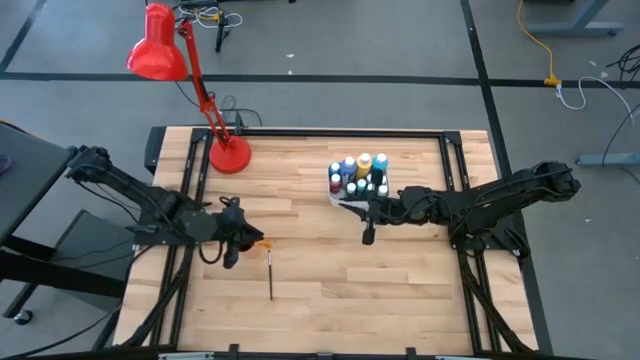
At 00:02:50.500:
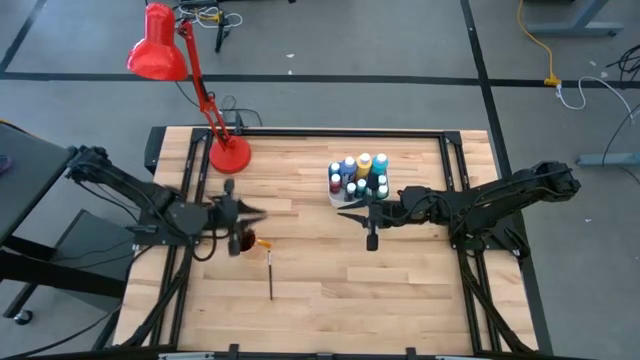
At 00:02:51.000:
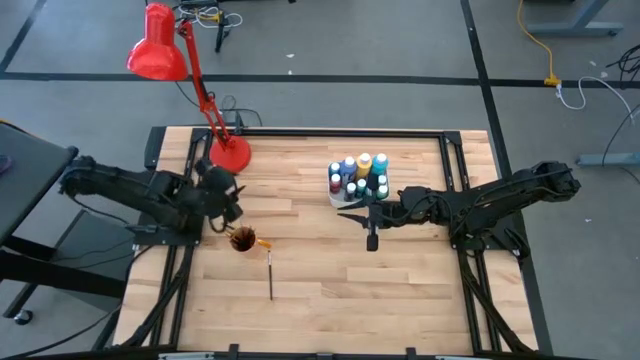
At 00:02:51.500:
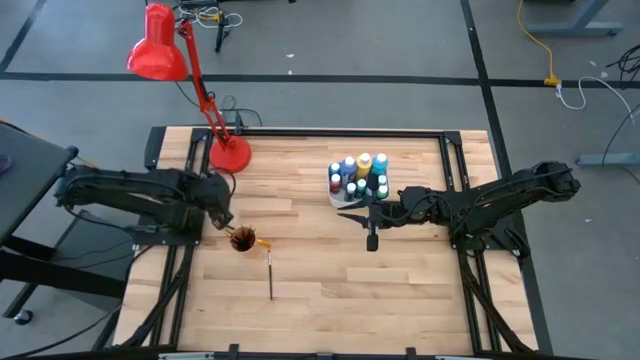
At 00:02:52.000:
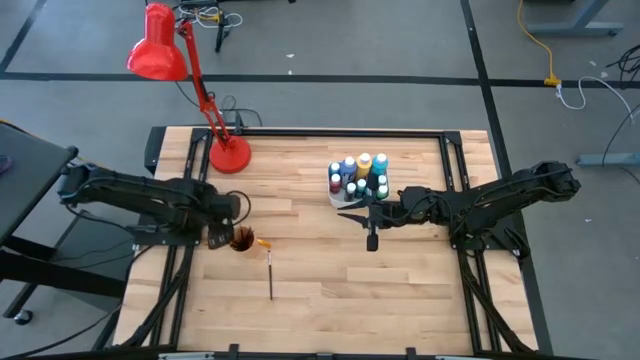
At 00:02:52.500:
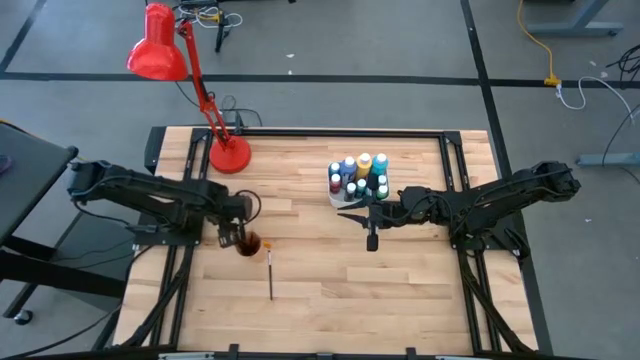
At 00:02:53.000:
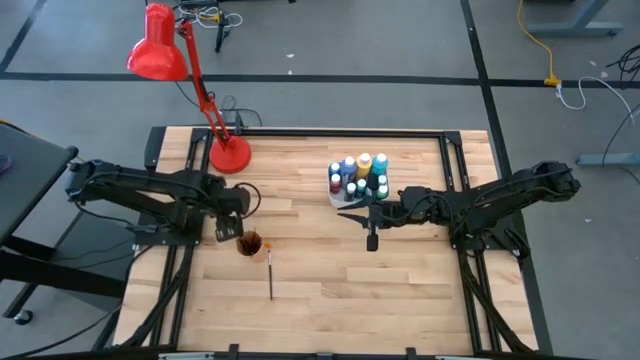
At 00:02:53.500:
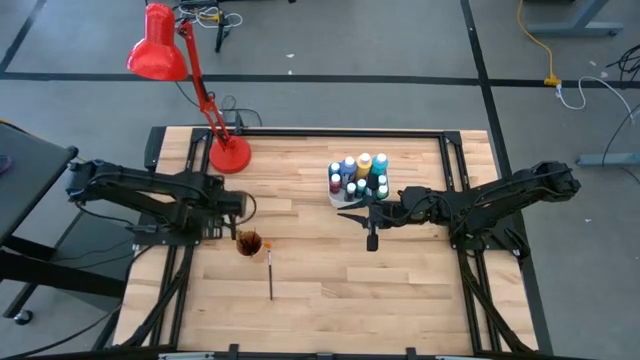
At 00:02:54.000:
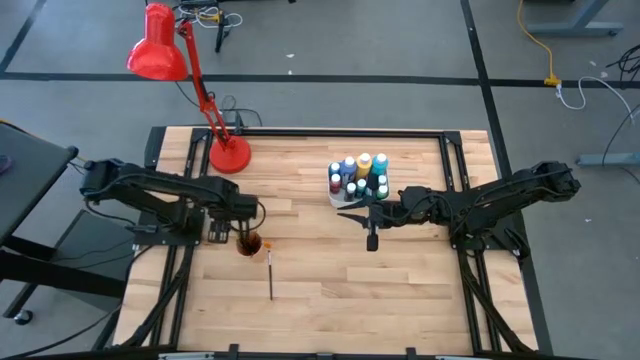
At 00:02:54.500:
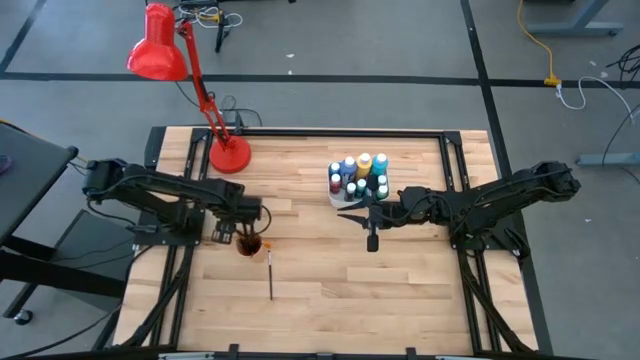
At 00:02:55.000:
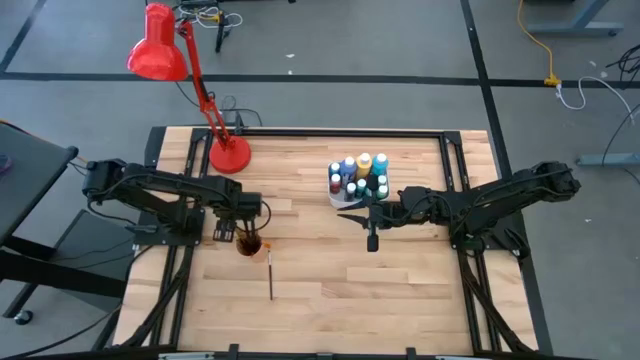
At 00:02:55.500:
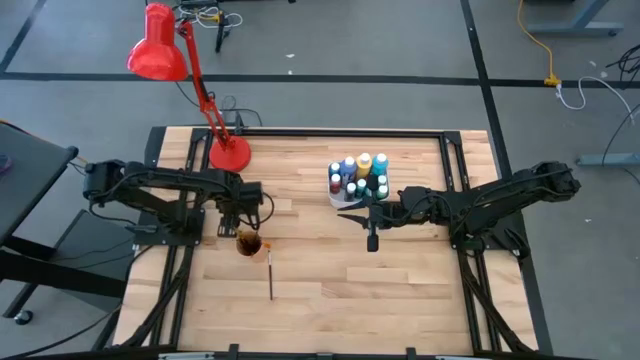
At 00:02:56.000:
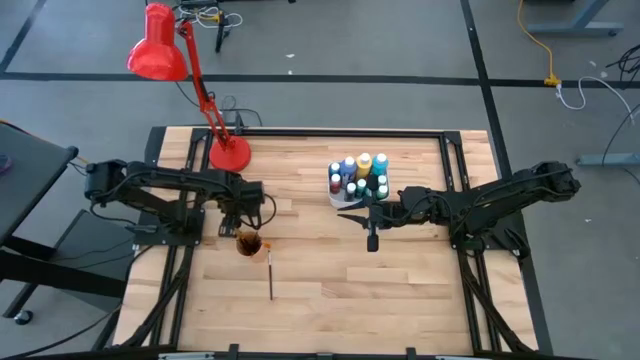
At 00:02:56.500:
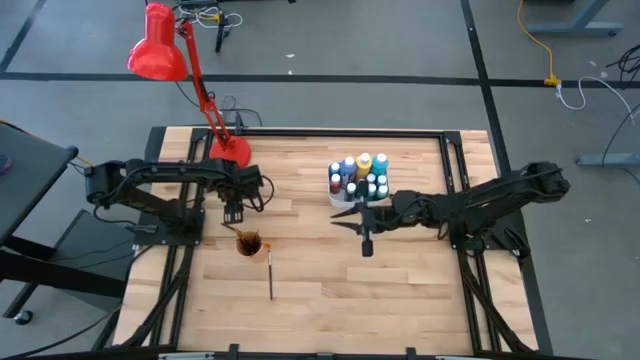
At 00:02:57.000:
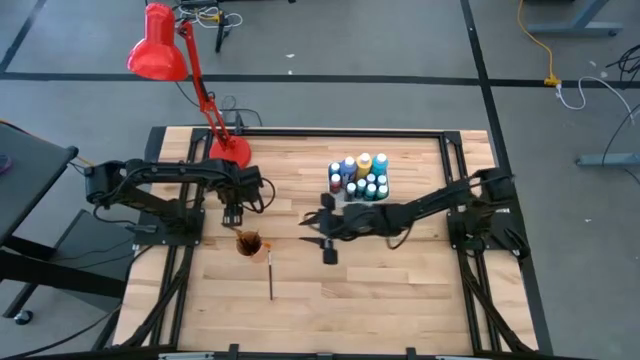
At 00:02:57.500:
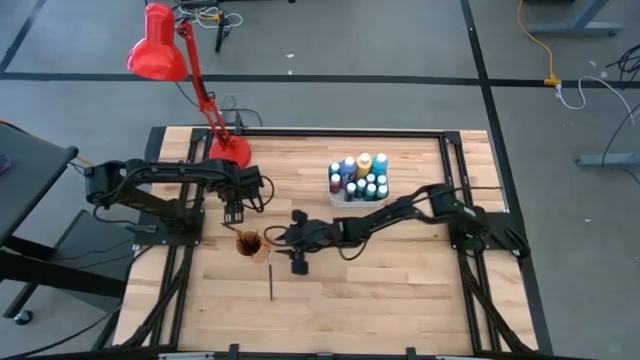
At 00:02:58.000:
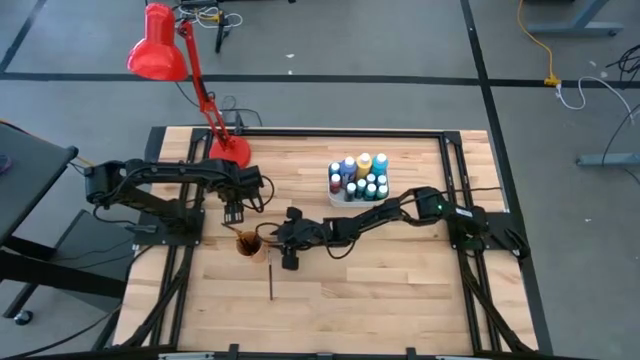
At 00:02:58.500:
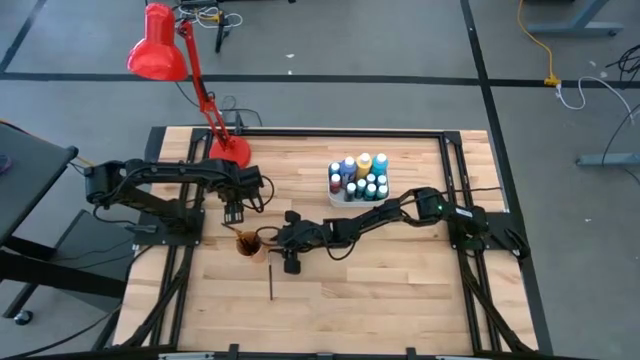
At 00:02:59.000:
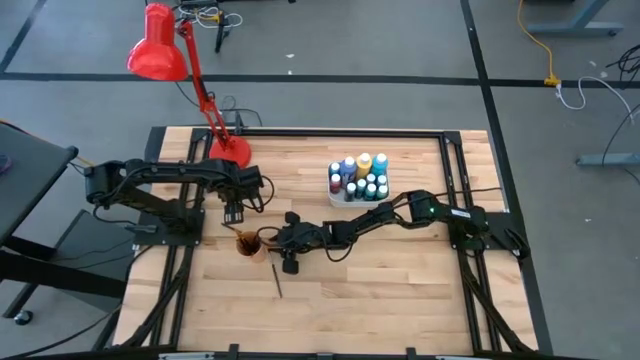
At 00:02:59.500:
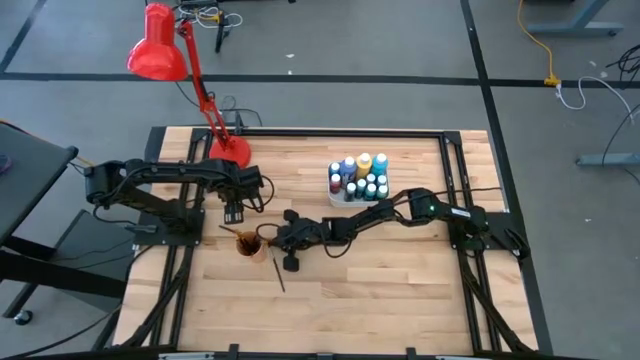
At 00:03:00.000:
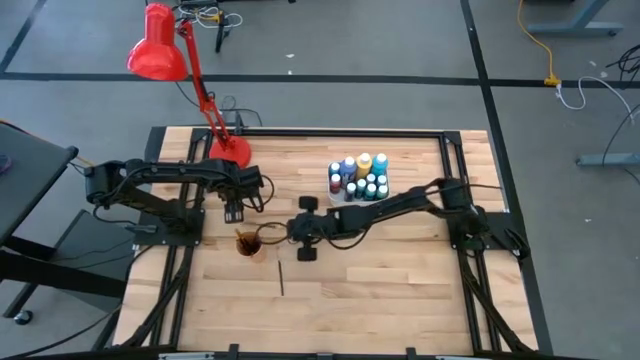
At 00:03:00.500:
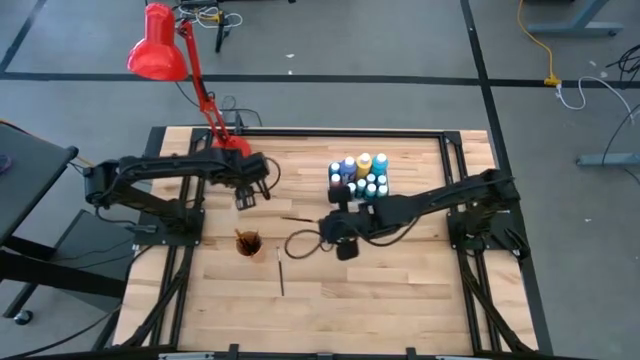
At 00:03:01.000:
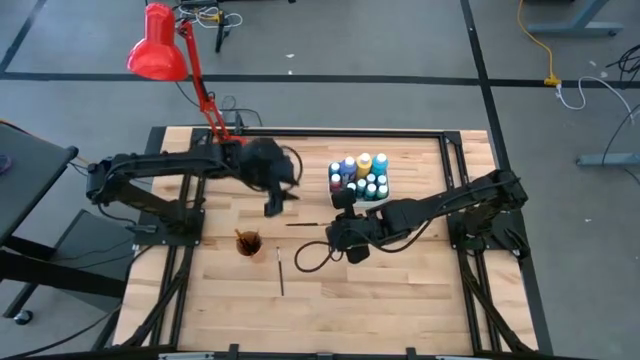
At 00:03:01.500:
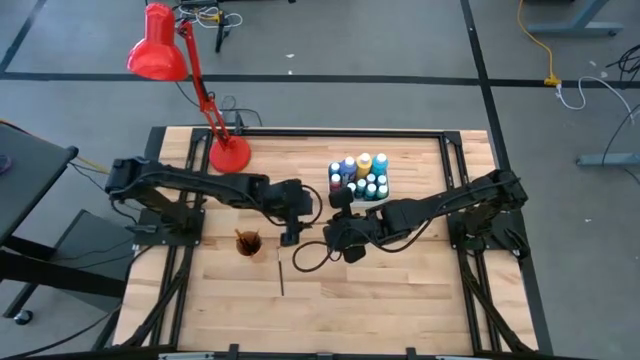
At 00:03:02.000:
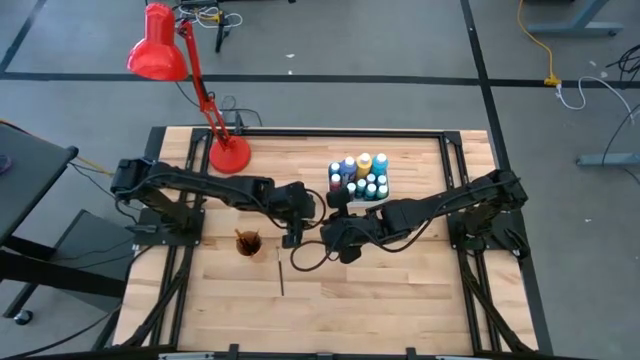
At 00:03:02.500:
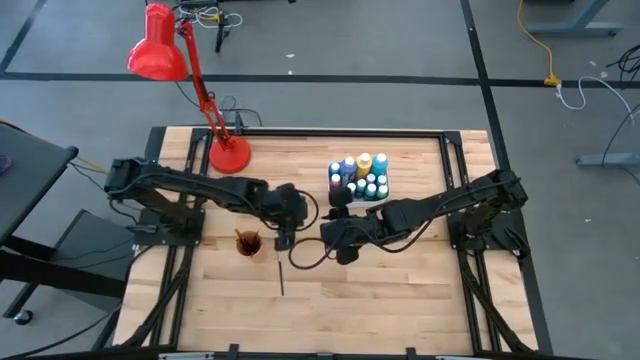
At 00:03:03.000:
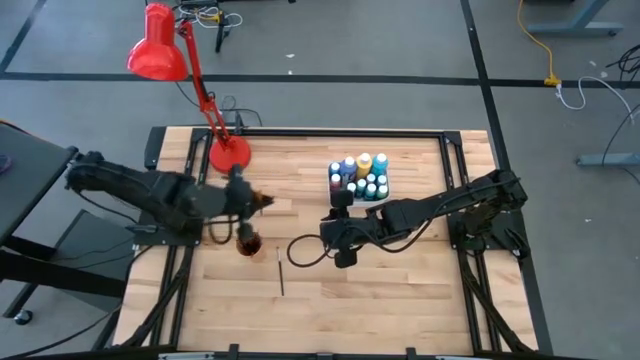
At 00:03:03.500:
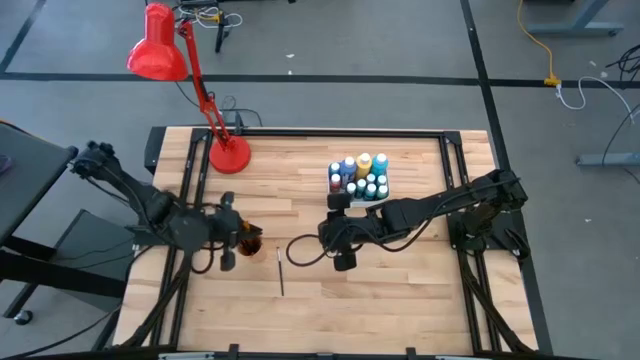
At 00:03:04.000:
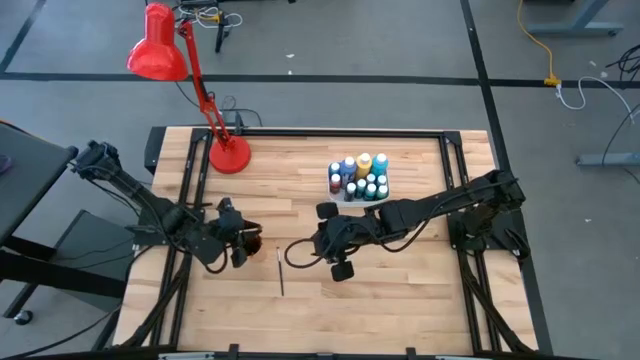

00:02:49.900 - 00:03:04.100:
Task: Pick & Place Paint Supplies
Put the gold paint brush into the orange cup

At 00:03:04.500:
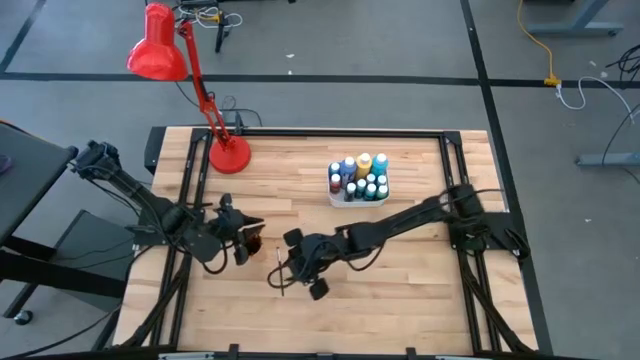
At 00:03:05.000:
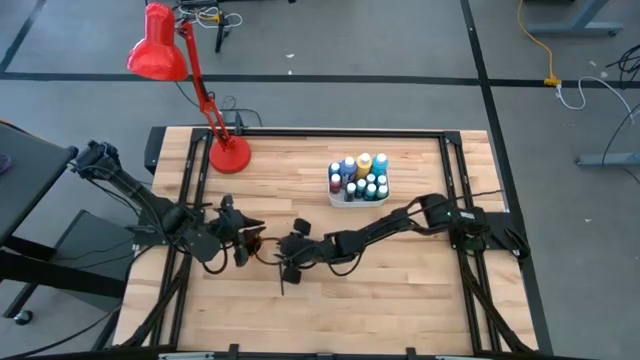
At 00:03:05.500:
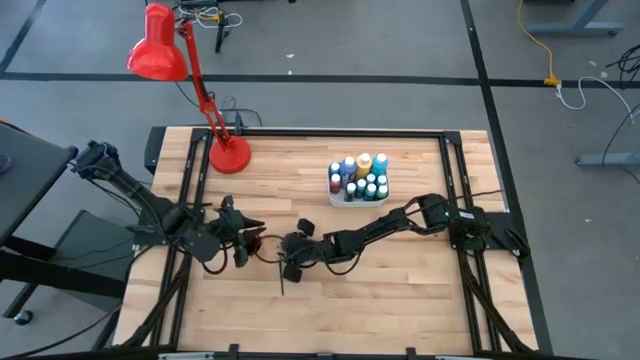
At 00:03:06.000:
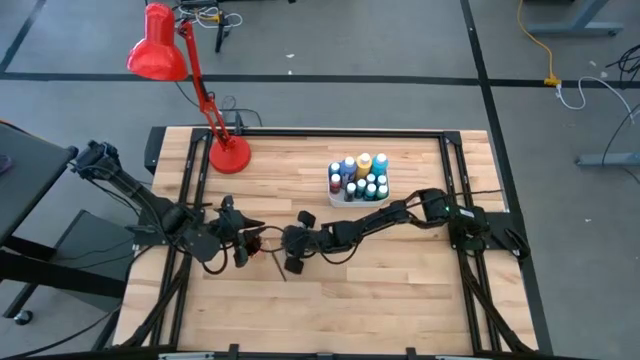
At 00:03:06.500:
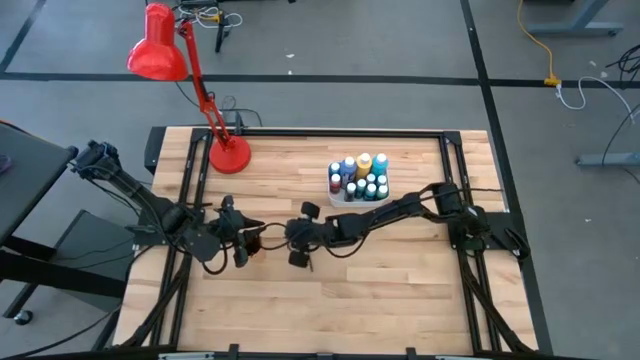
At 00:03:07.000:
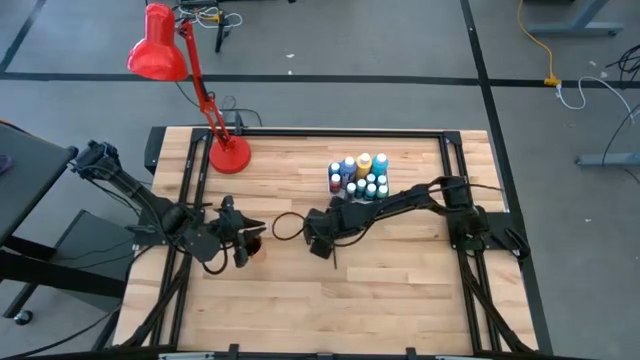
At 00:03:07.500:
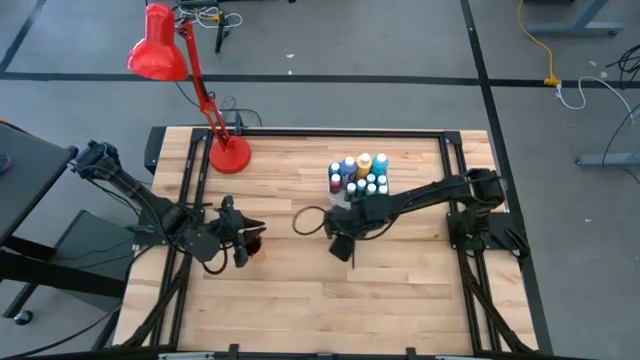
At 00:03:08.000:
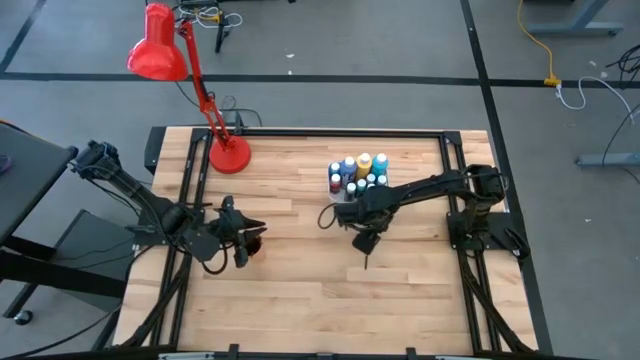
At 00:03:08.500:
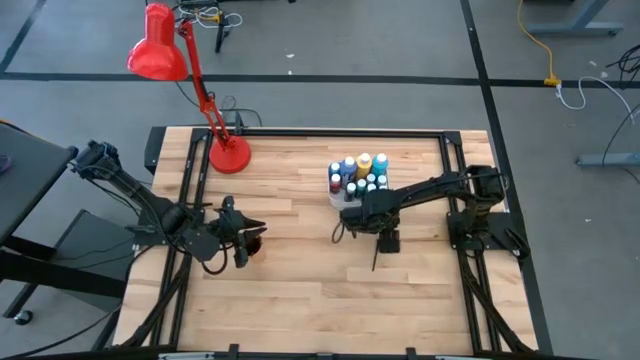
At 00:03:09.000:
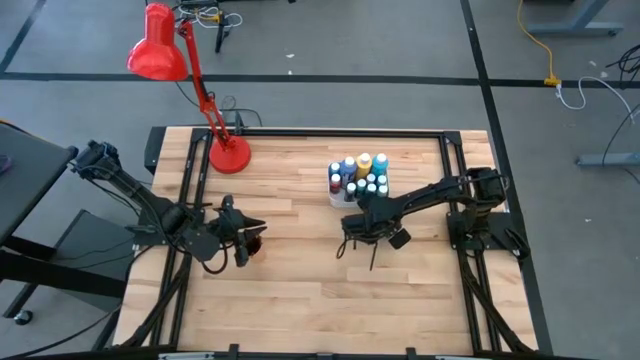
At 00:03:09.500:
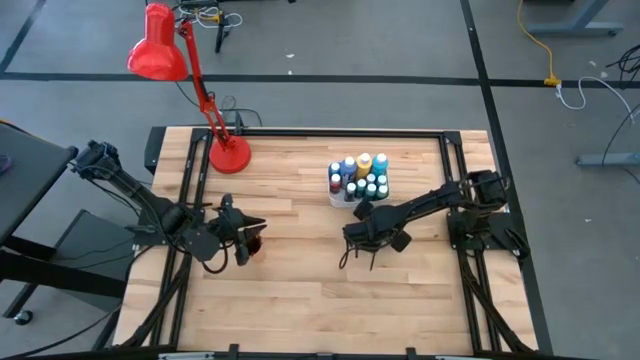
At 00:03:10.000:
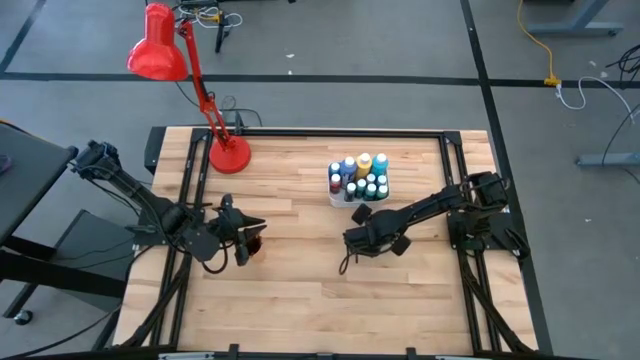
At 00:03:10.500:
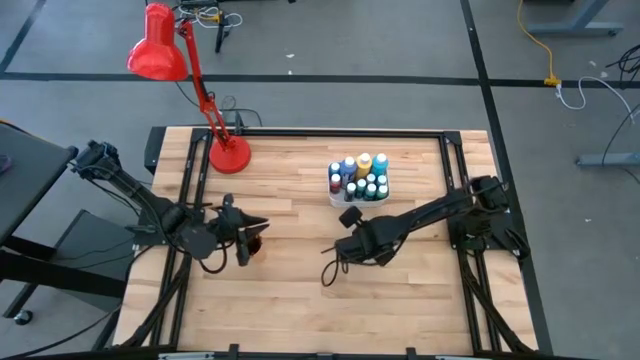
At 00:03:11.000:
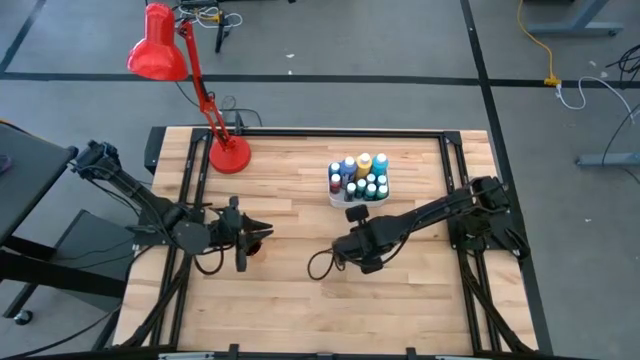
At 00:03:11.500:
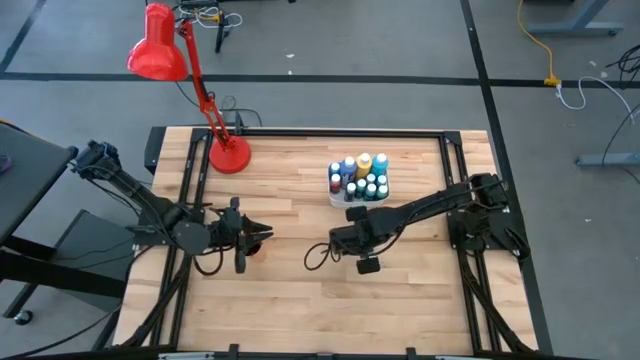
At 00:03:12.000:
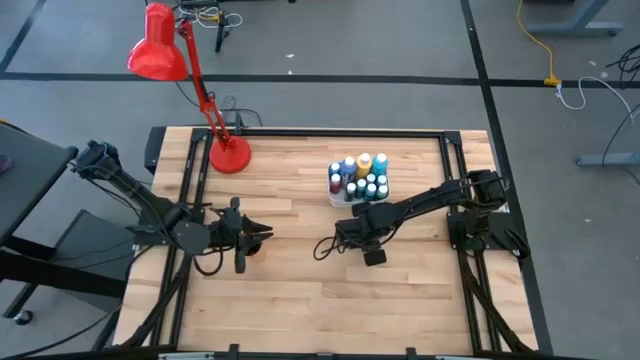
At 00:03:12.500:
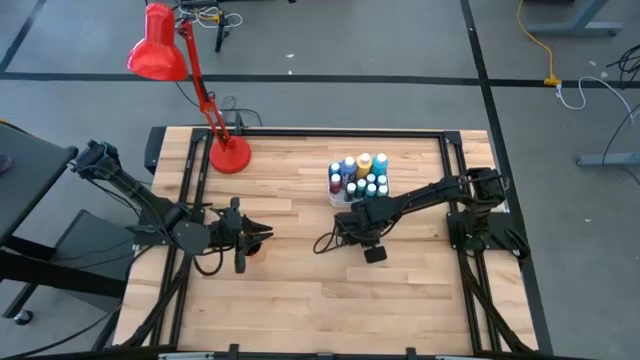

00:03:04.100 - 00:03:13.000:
Put the silver paint brush into the orange cup
